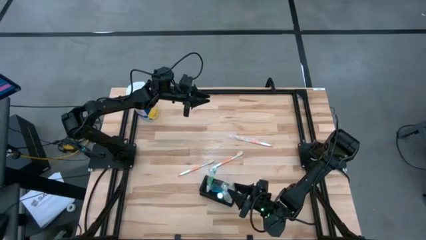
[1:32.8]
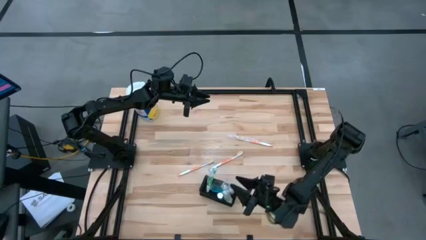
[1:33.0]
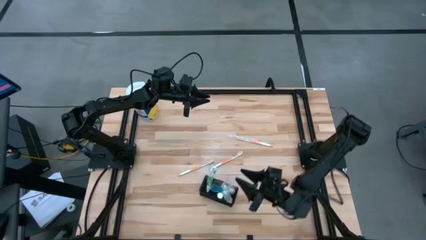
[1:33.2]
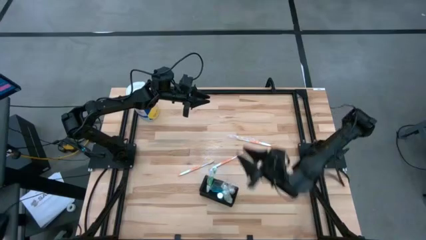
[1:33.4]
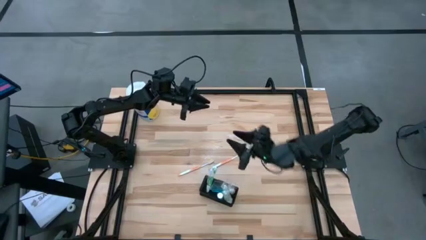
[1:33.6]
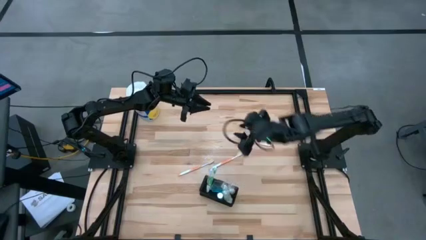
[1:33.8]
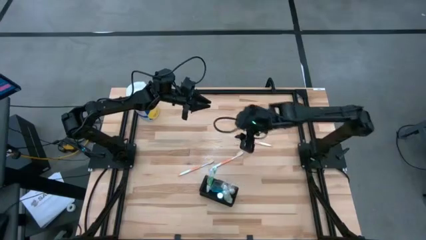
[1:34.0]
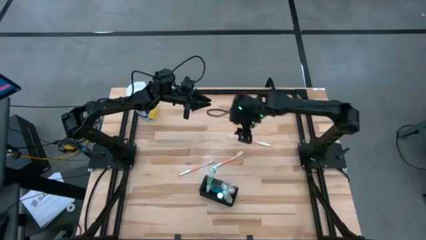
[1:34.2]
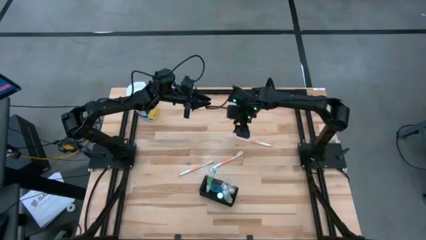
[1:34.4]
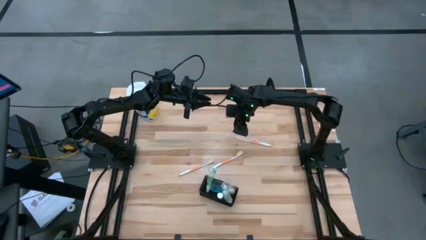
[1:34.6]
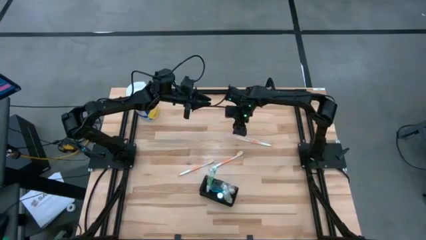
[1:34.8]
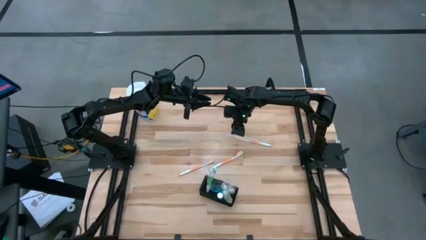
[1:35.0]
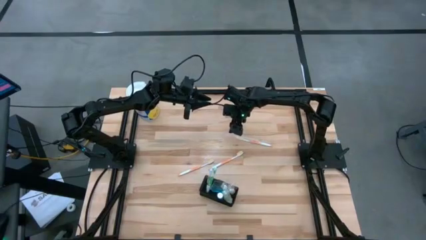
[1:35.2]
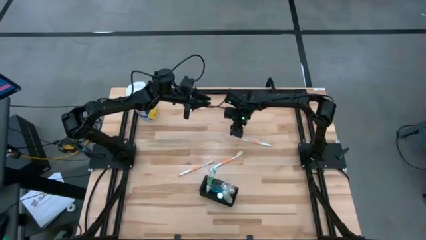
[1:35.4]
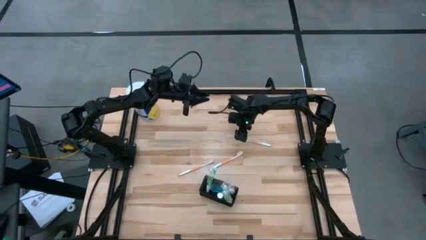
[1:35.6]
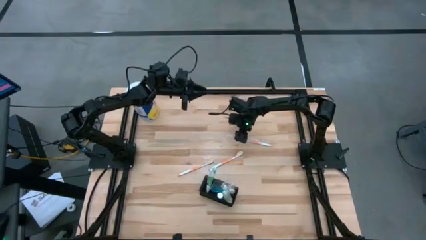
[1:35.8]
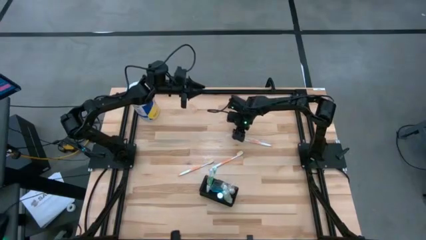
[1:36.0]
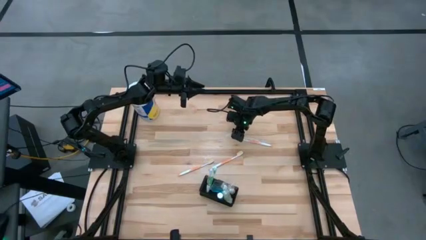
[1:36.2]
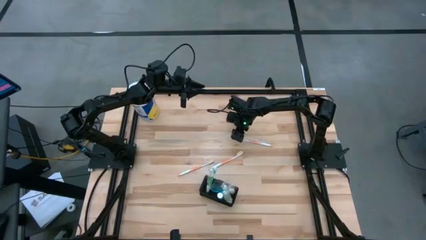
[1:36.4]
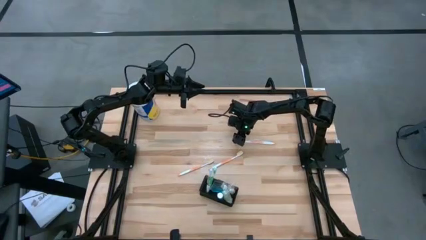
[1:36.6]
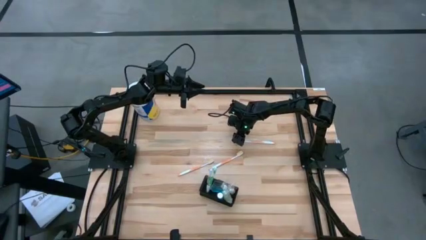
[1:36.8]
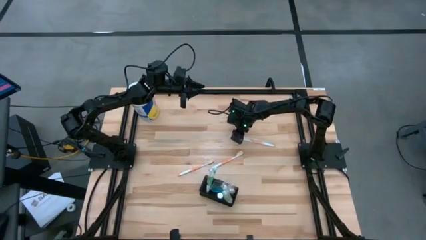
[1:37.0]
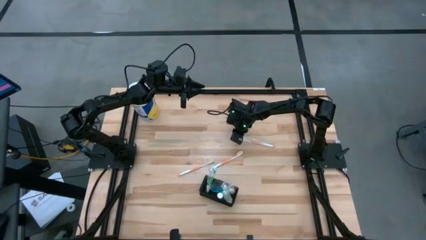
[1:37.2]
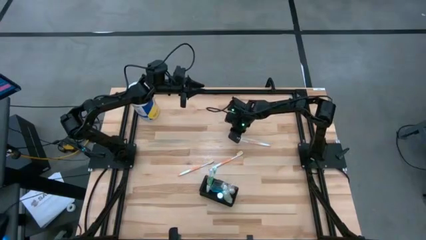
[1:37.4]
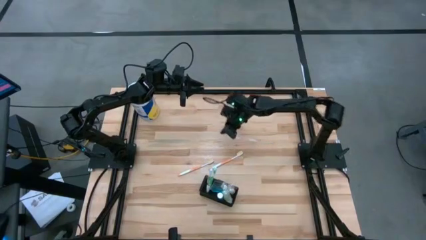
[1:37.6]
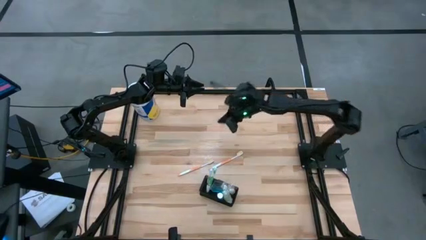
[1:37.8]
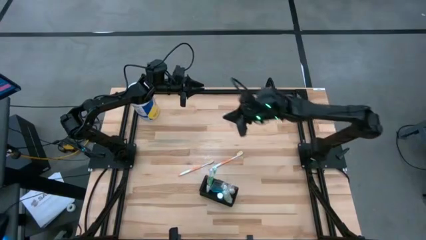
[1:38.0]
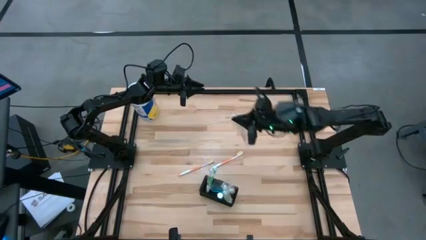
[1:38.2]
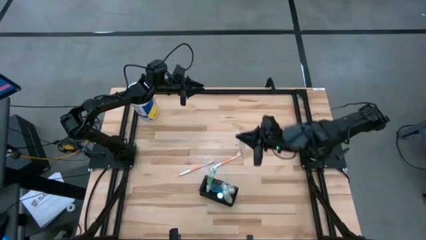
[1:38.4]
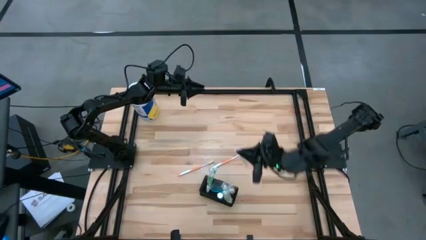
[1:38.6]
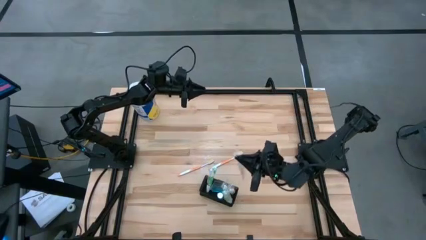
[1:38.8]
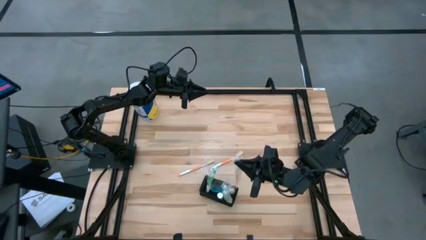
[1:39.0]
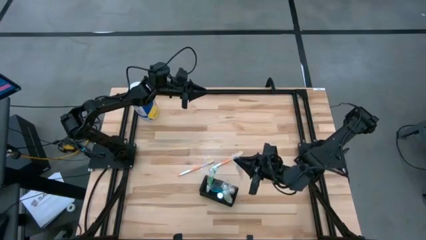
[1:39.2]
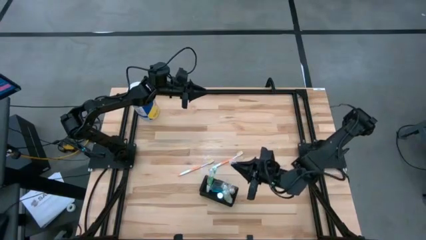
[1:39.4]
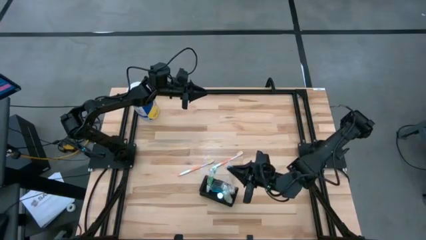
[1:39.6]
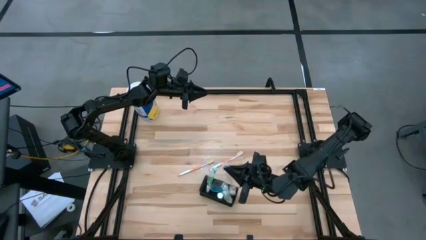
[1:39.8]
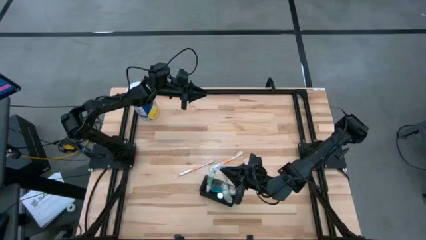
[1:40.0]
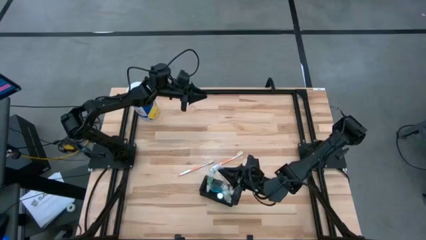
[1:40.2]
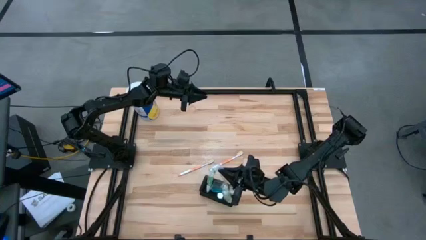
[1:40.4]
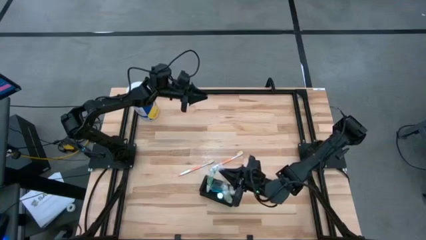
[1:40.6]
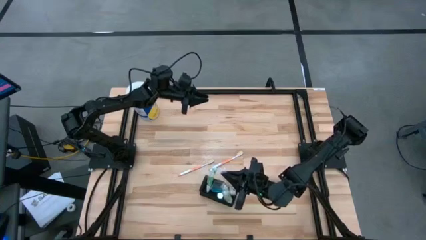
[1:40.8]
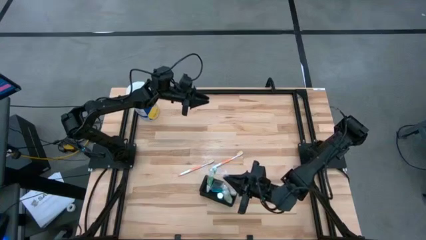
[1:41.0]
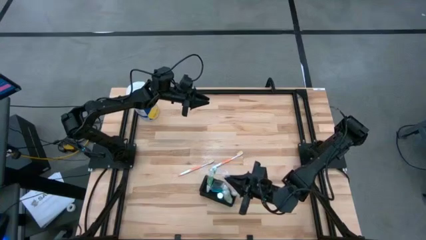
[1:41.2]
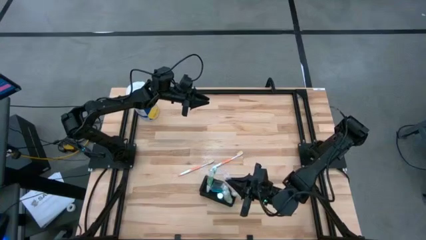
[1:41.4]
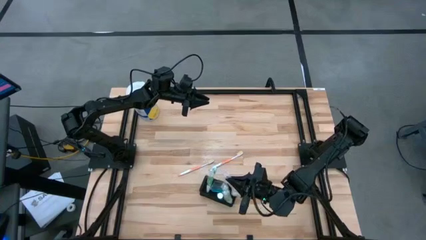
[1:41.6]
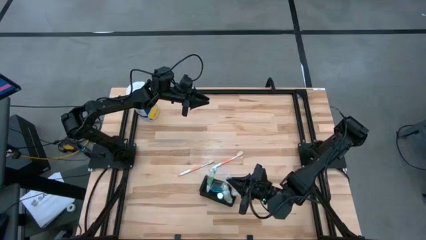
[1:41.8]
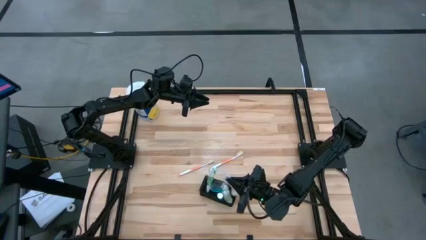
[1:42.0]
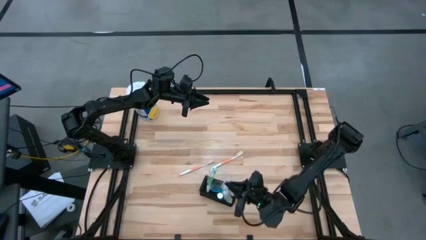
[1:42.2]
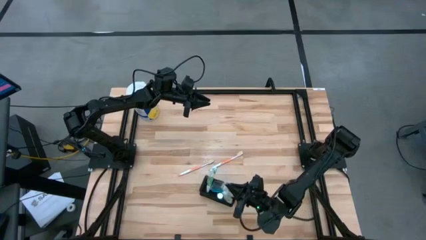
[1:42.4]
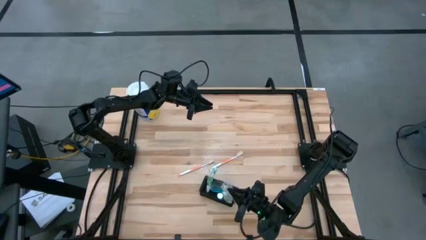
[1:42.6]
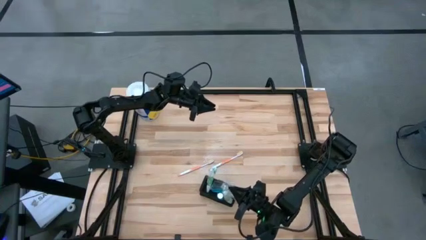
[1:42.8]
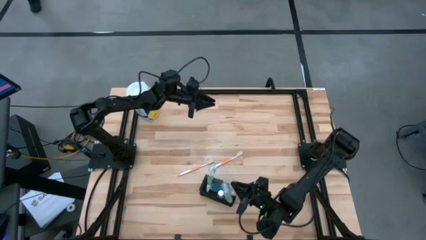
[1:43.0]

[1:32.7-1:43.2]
Task: Pick & Place toothbrushing station
Put the orange toothbrush into the black wire organizer

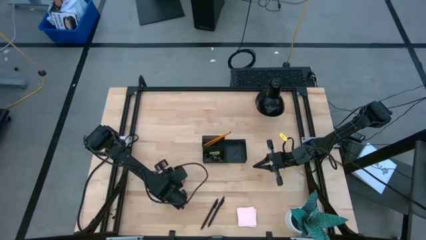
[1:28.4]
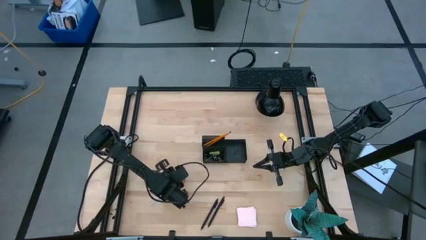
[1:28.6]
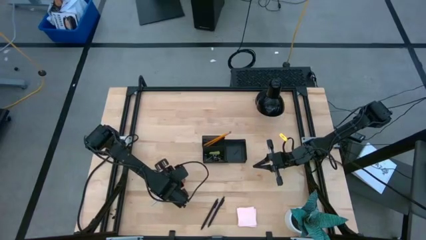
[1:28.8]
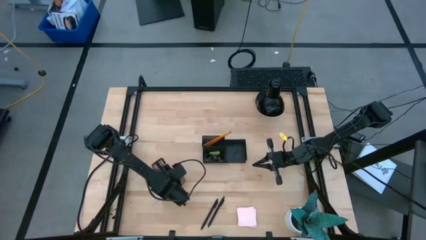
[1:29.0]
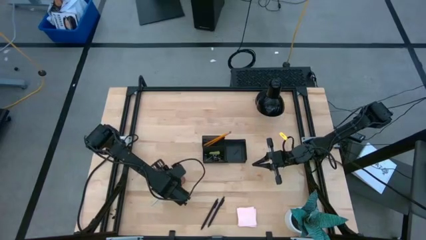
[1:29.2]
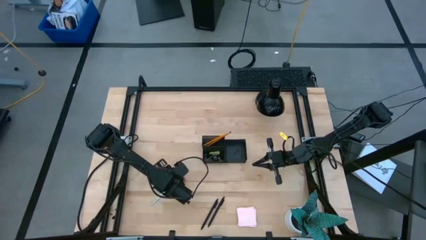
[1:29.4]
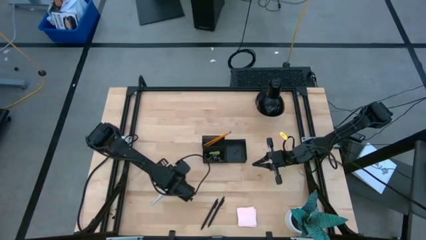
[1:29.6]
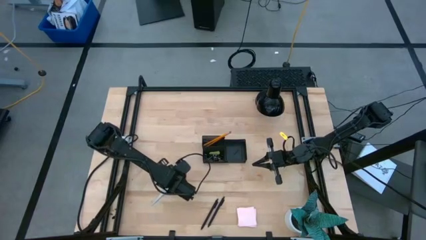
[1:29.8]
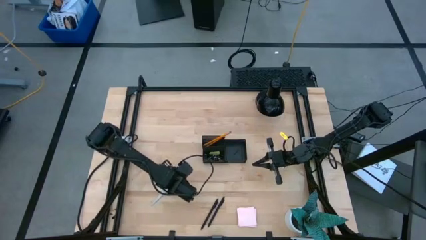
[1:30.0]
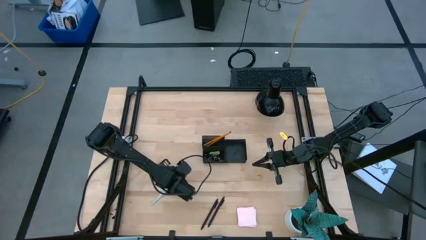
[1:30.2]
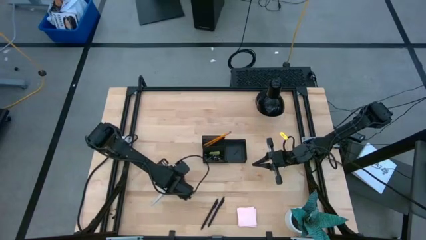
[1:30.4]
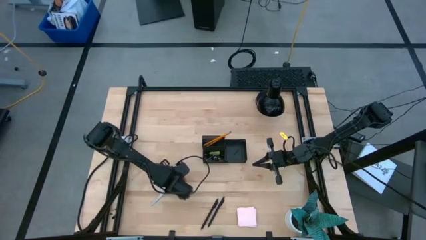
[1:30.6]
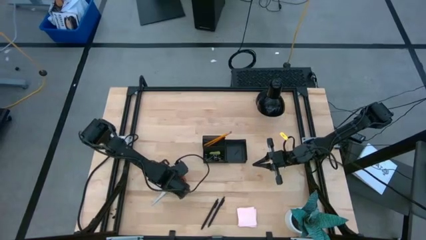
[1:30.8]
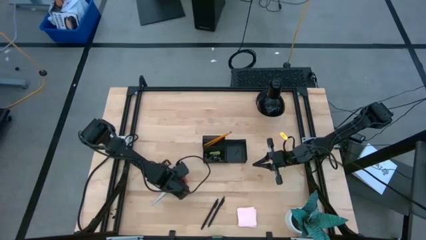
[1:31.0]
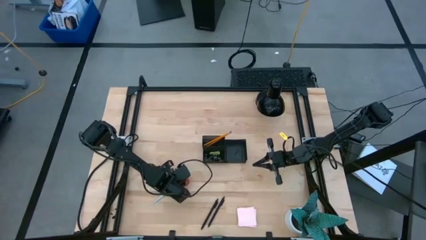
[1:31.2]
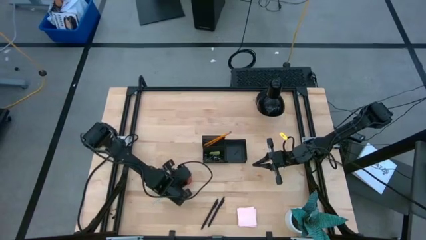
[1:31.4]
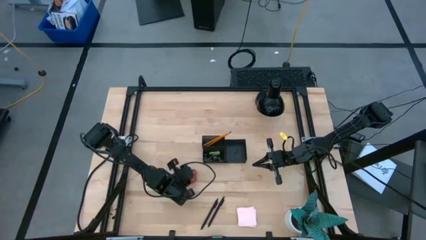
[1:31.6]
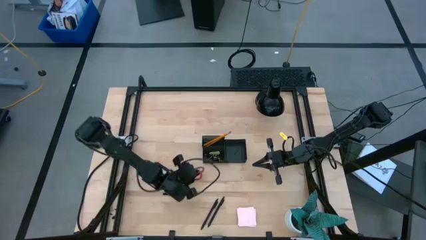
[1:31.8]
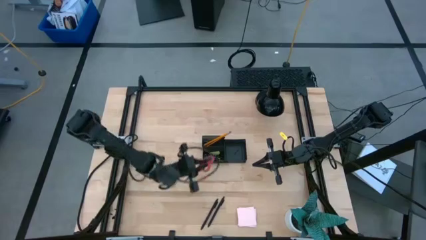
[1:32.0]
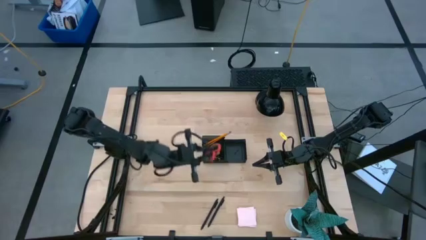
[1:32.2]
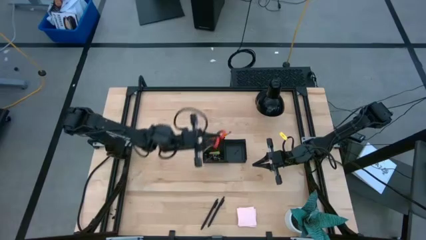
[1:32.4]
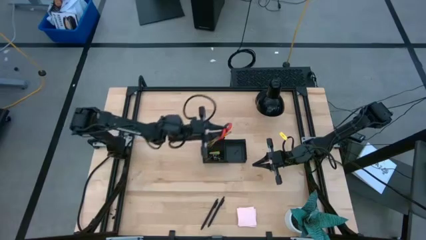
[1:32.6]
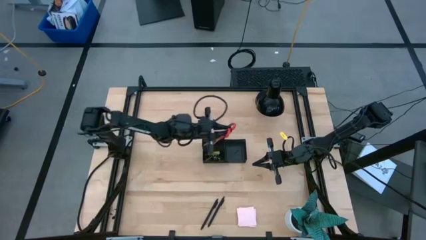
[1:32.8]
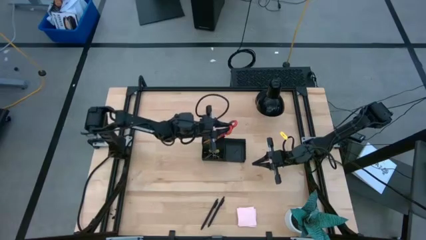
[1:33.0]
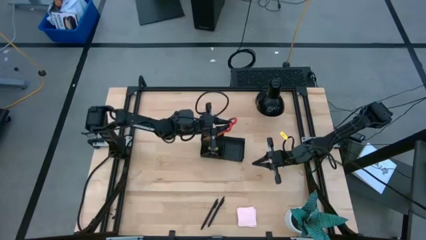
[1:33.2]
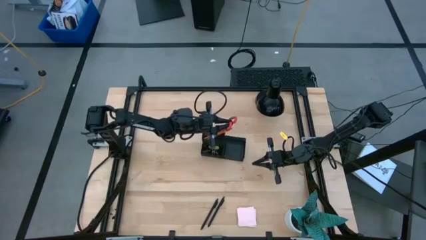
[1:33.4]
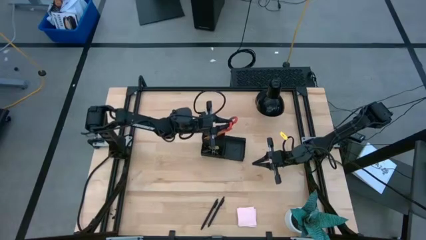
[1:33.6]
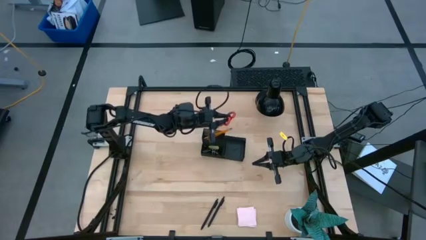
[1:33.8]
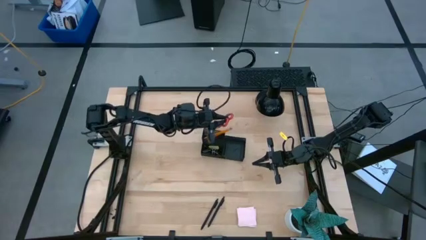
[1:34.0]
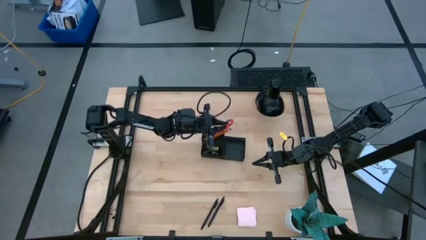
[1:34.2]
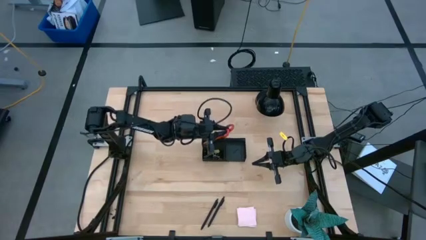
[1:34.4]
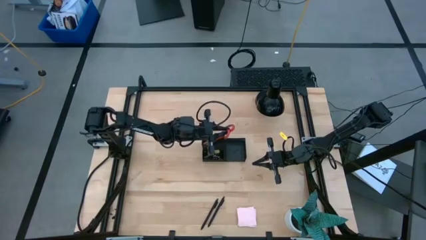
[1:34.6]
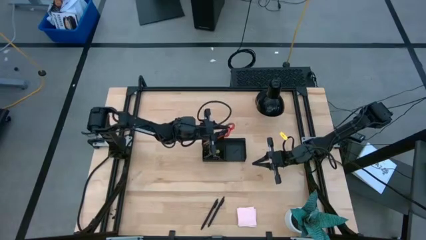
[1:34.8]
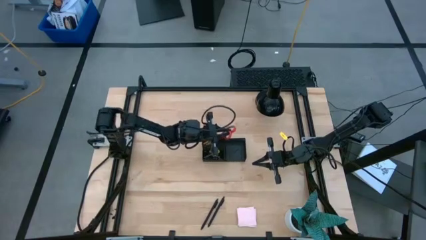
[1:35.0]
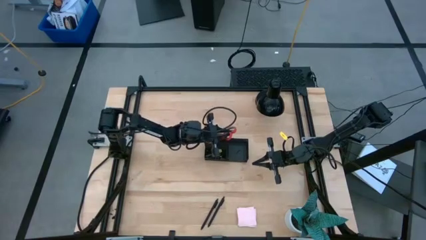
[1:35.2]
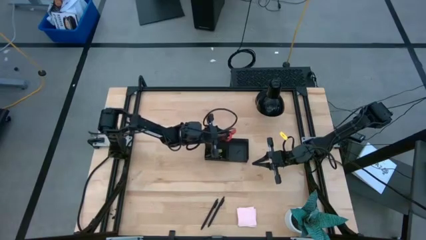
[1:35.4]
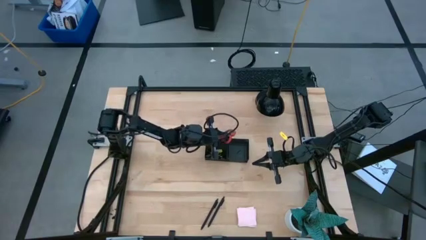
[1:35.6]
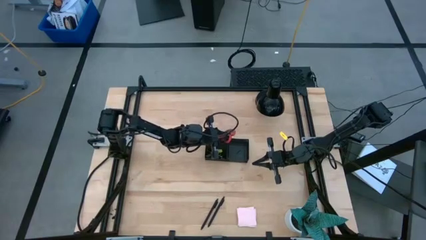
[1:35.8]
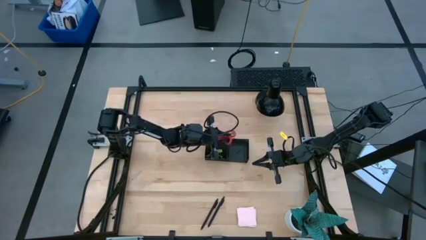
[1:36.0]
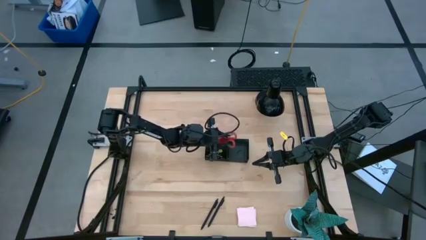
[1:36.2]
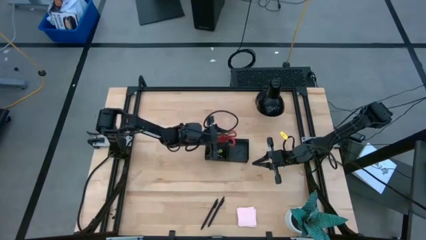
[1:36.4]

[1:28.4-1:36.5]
Task: Pick and place office supplies into organizer
Put the red scissors into the black desk organizer
